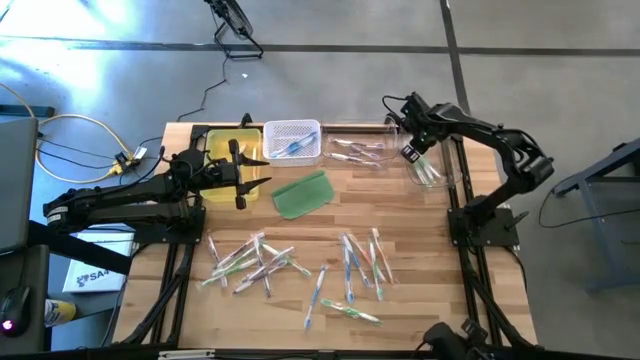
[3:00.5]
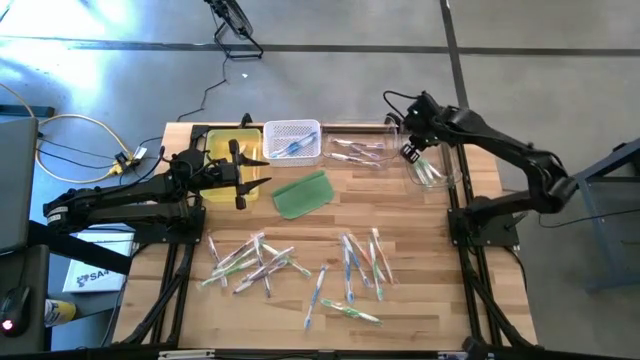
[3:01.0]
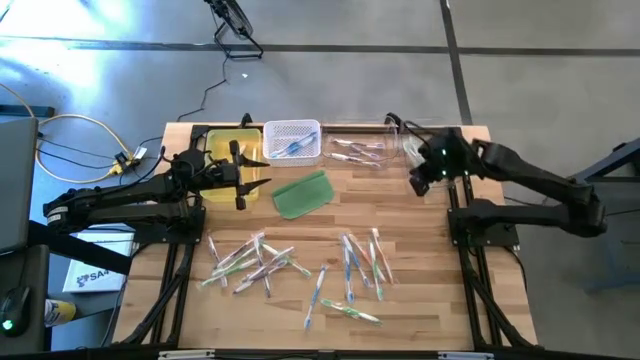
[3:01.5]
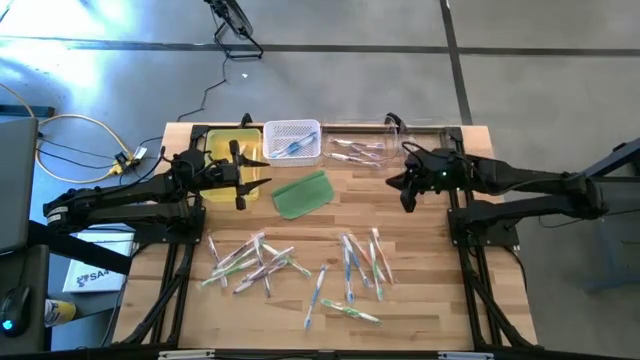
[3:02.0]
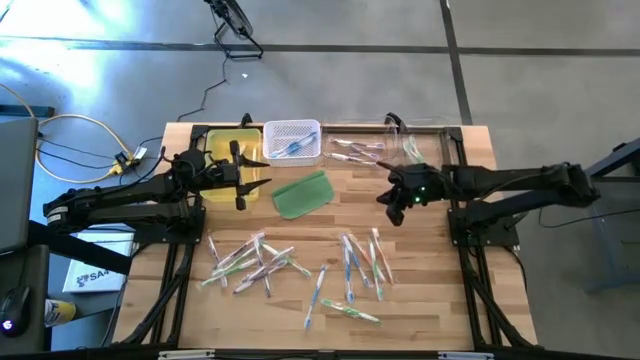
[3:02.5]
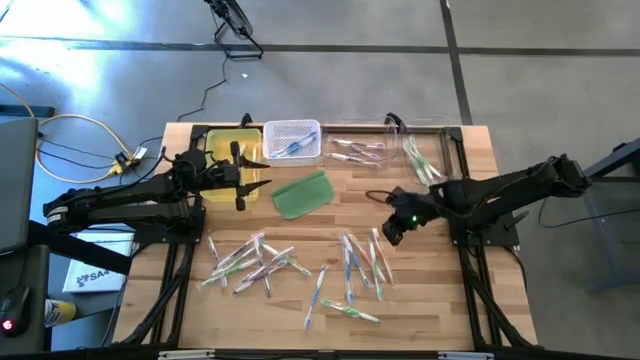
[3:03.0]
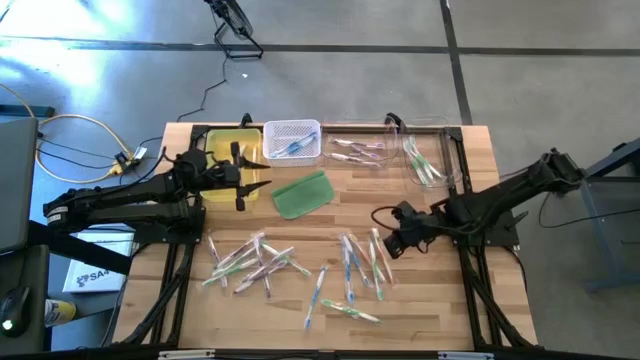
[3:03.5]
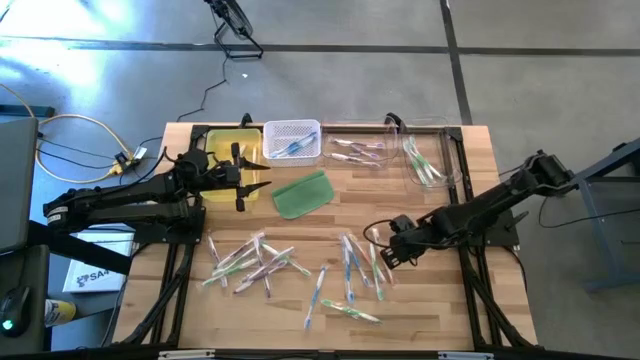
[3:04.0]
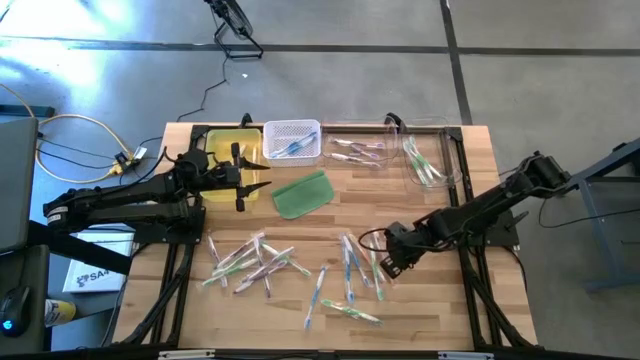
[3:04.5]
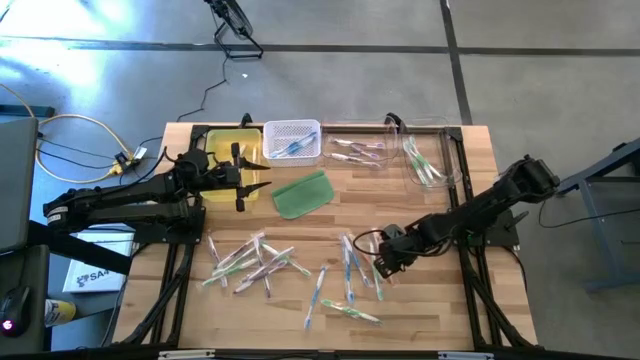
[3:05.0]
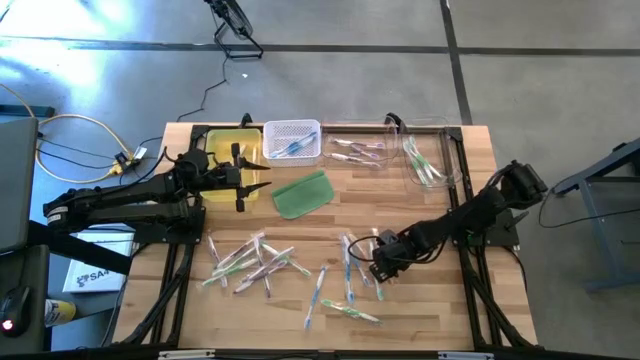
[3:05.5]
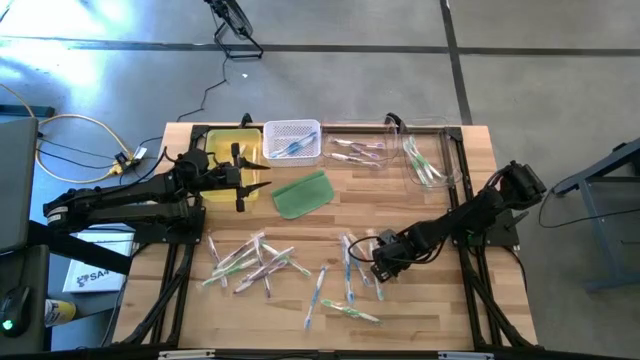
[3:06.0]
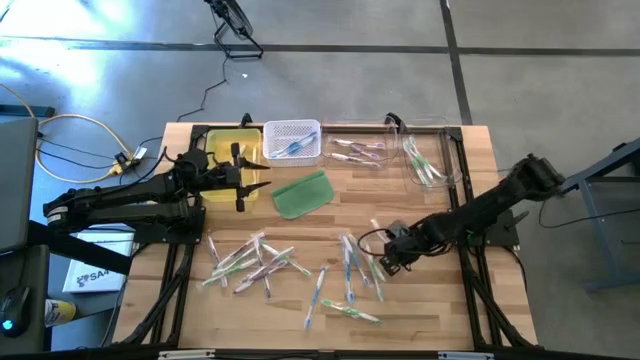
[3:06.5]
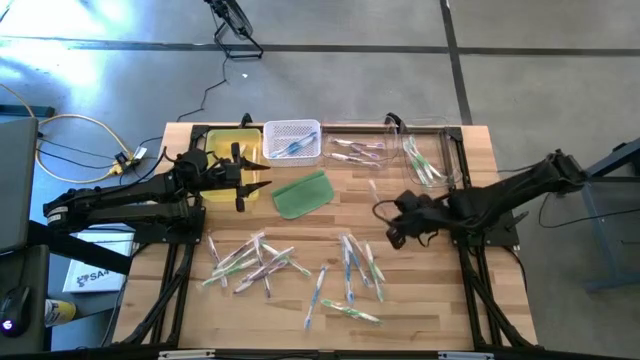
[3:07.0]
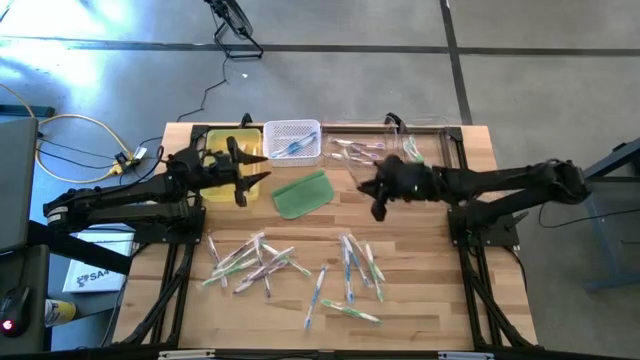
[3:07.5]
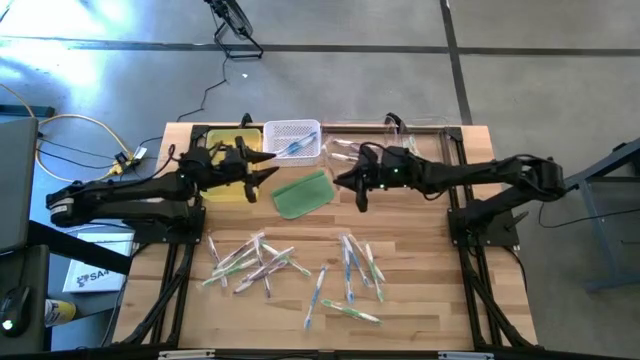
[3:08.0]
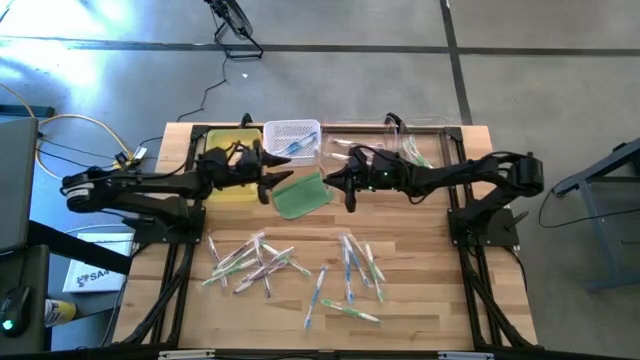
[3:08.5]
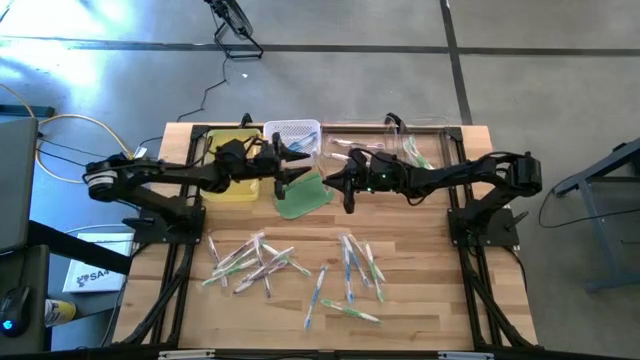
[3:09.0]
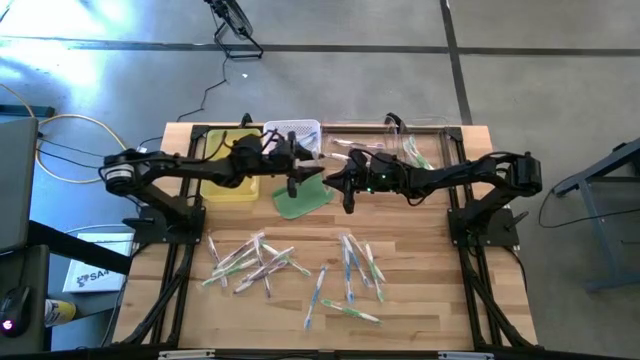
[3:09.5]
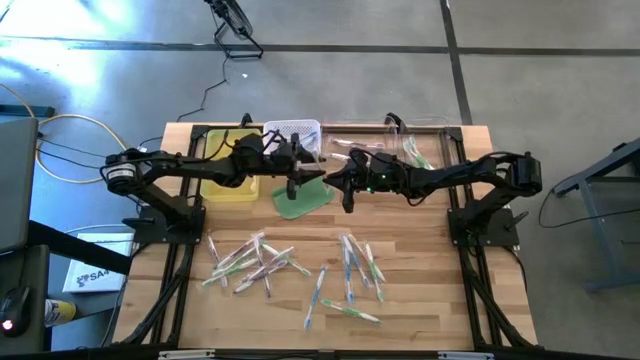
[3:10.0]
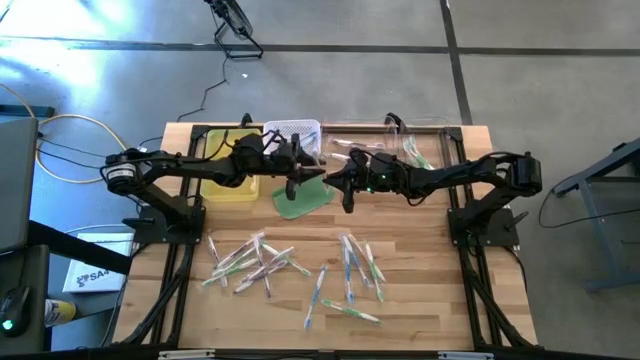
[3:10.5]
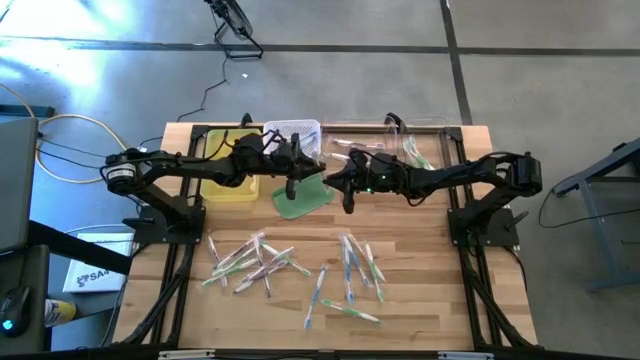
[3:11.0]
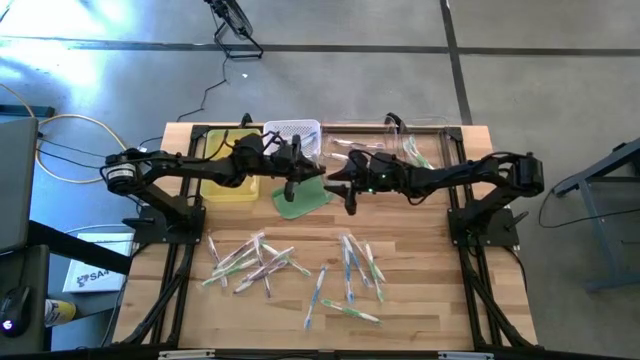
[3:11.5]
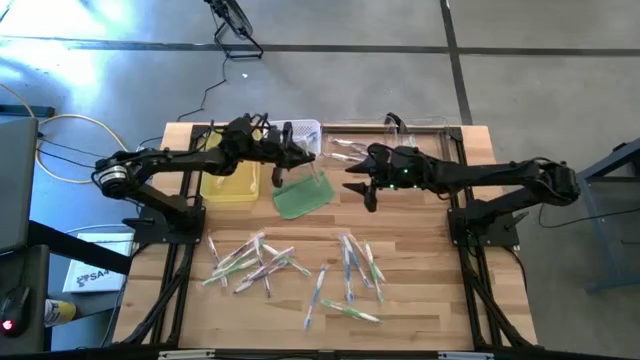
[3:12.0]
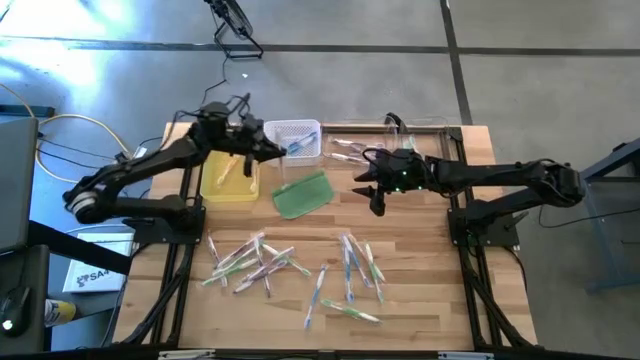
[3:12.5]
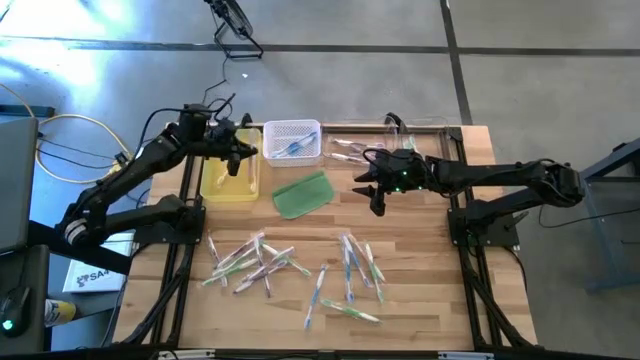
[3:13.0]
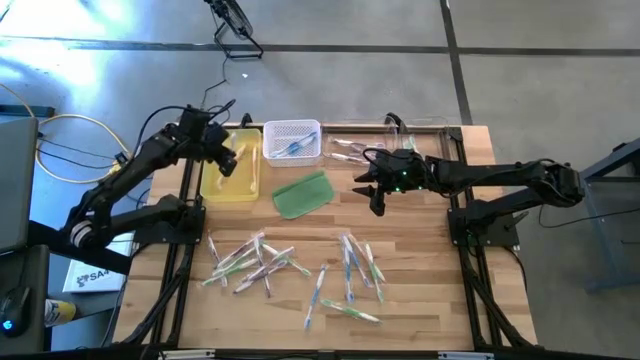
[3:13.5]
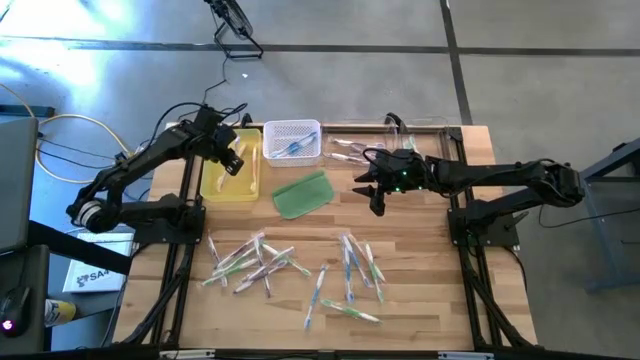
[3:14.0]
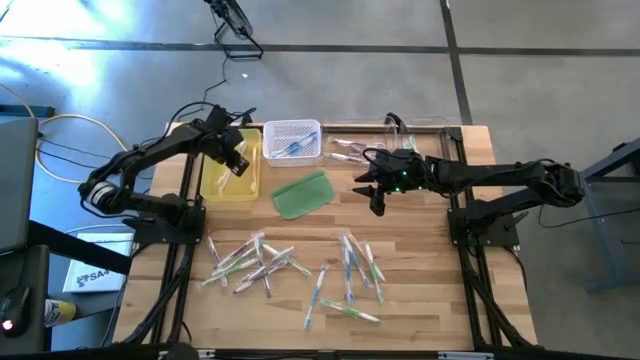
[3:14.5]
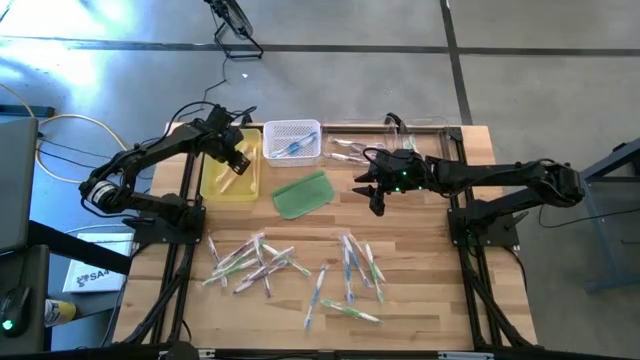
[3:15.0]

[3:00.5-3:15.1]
Task: Pick & Place Toothbrushes
Put the orange toothbrush into the yellow bin

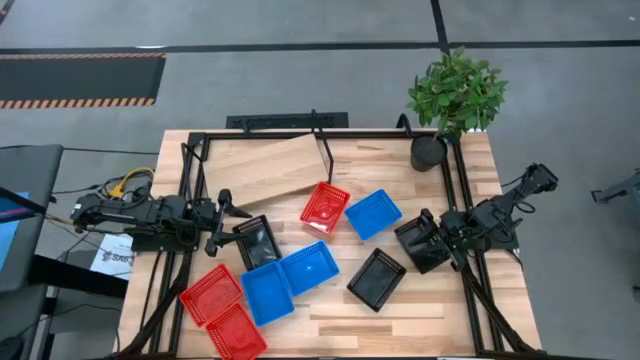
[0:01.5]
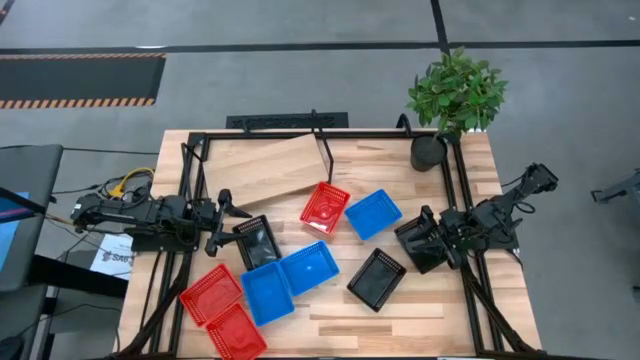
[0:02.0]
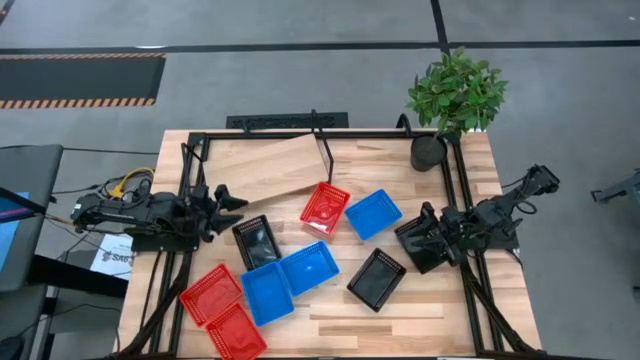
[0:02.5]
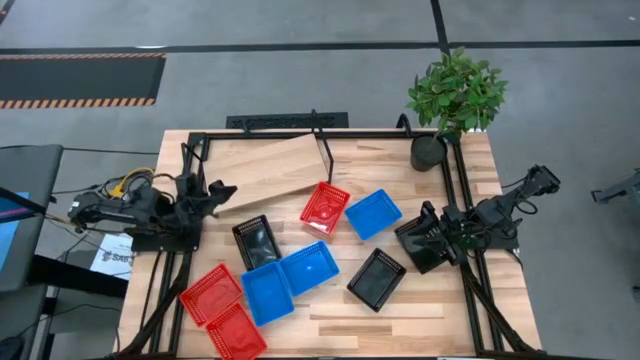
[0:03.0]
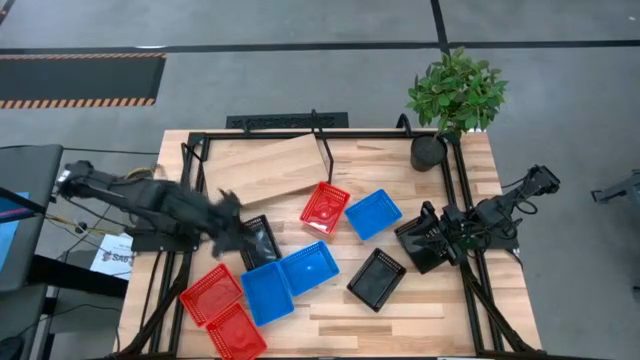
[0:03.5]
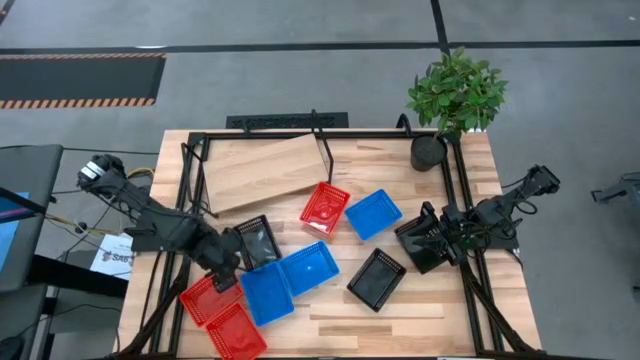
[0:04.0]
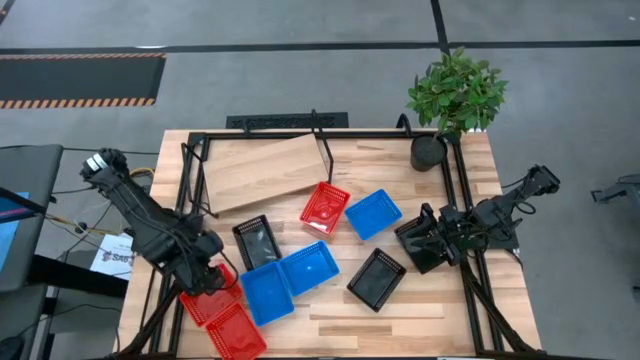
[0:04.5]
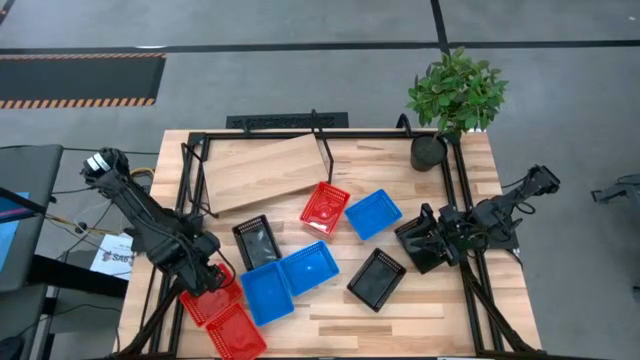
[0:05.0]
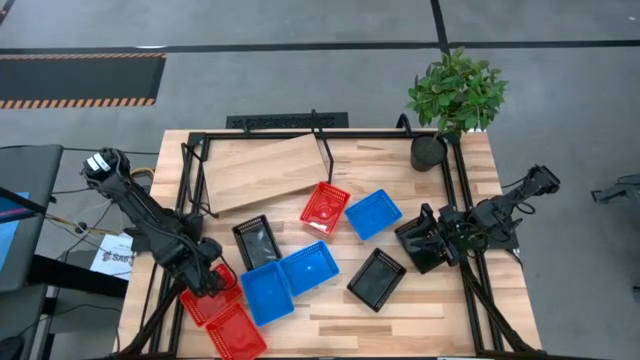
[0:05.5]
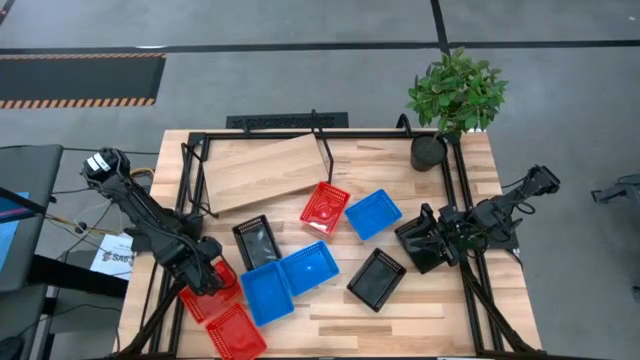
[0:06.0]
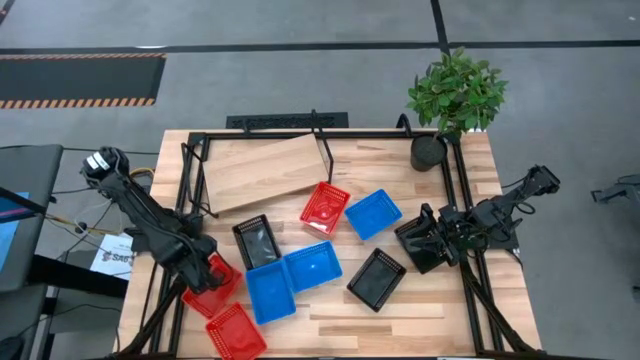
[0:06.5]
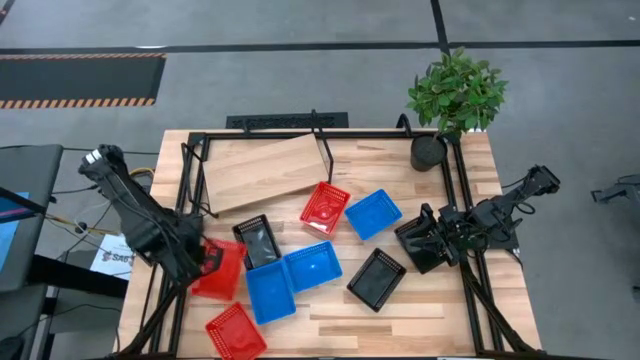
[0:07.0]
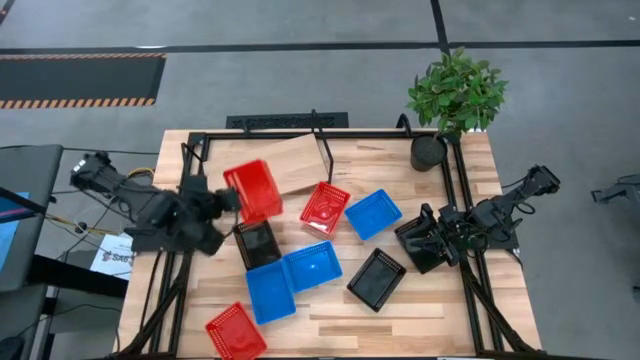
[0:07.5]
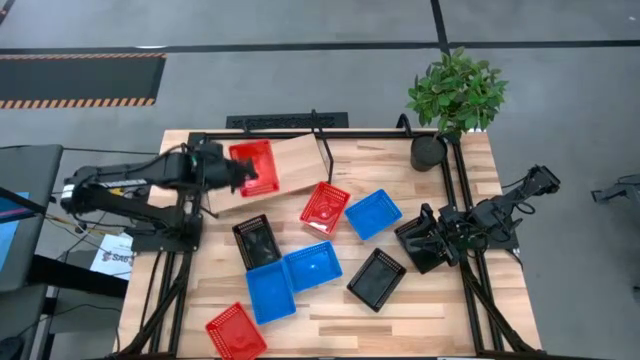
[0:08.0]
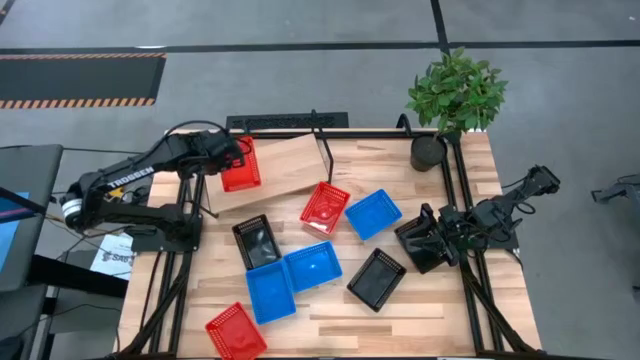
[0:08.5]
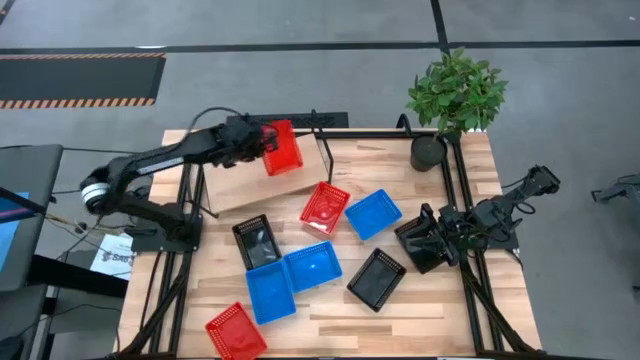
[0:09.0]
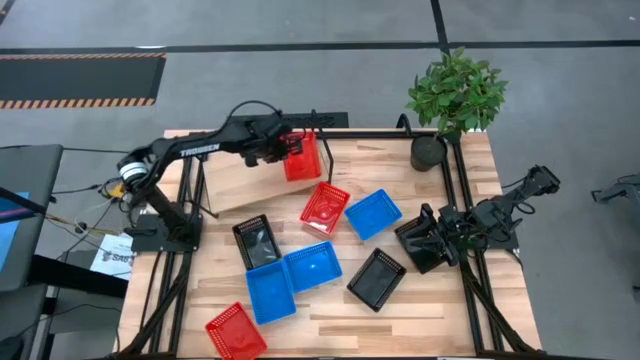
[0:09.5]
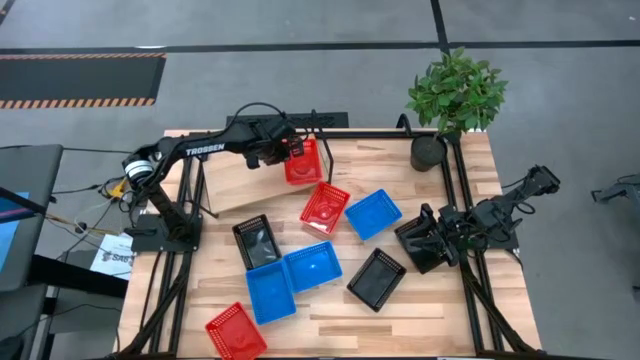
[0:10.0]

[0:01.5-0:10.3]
Task: Stack baskets on shelf by color
Put the middle red bin on the shelf
